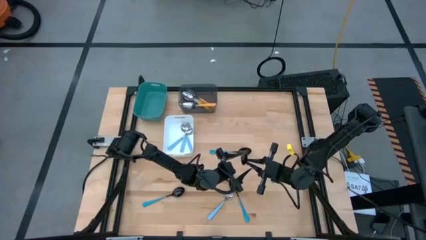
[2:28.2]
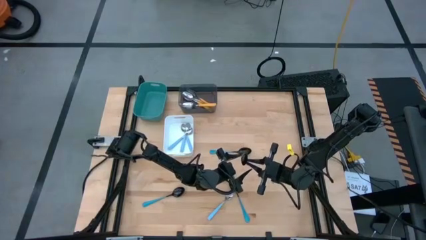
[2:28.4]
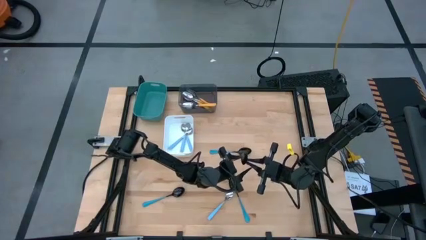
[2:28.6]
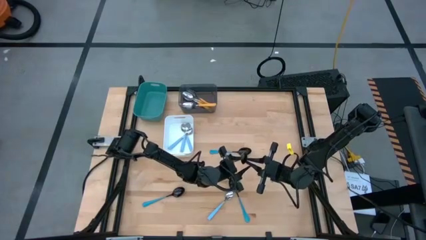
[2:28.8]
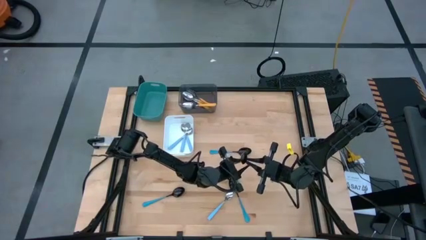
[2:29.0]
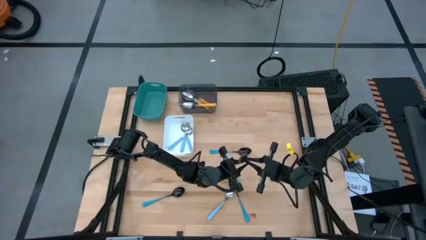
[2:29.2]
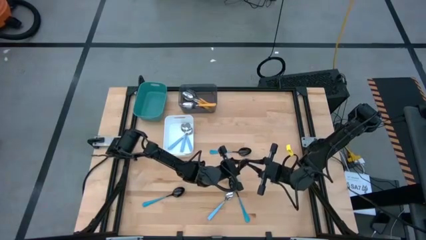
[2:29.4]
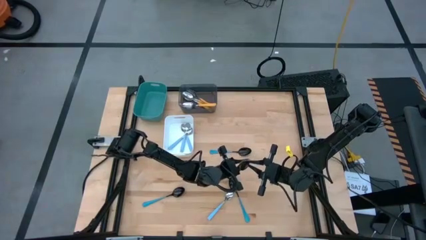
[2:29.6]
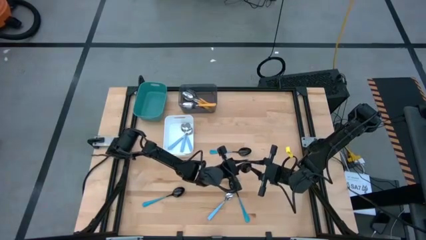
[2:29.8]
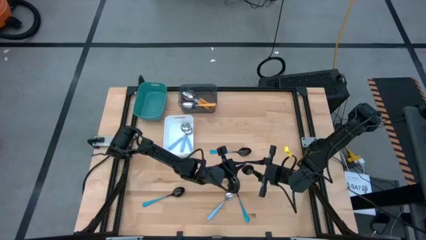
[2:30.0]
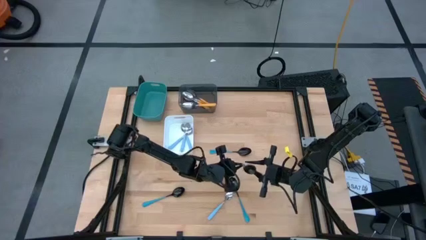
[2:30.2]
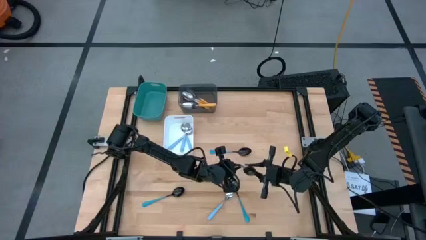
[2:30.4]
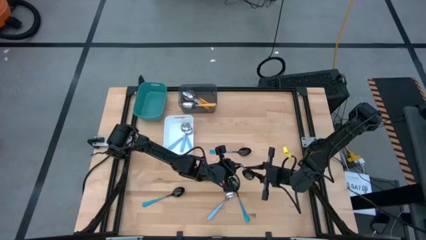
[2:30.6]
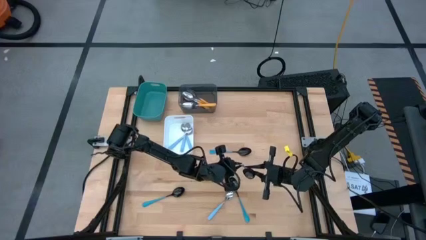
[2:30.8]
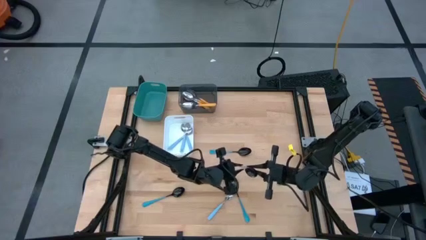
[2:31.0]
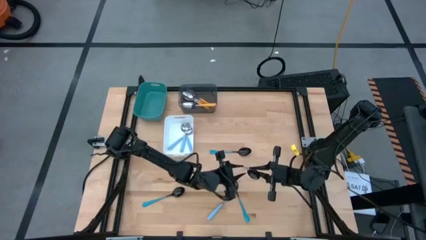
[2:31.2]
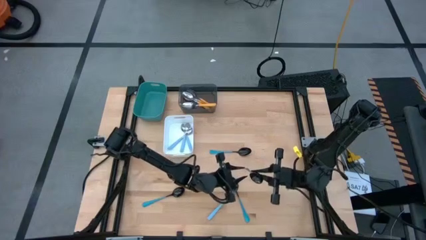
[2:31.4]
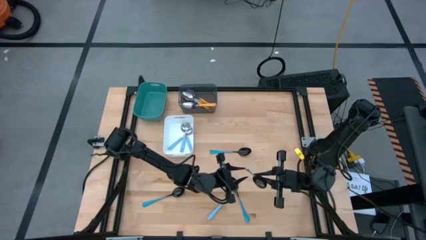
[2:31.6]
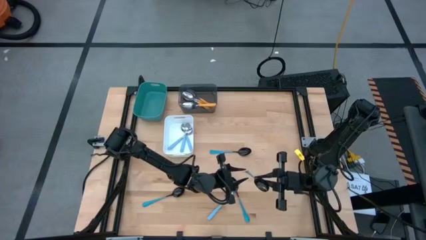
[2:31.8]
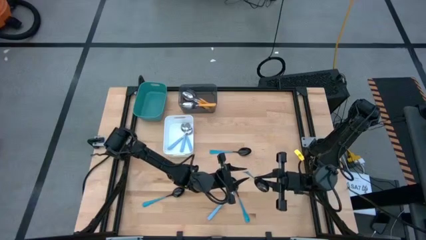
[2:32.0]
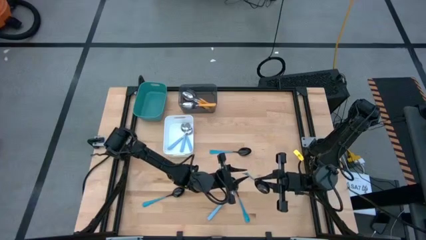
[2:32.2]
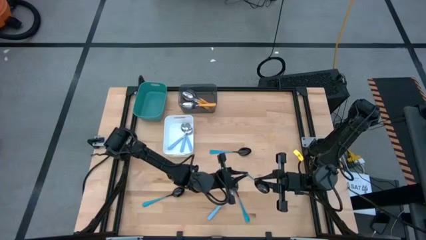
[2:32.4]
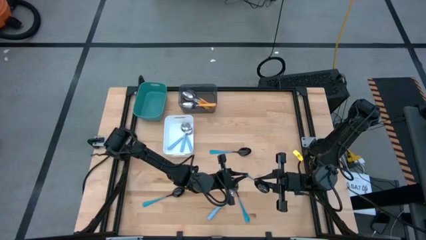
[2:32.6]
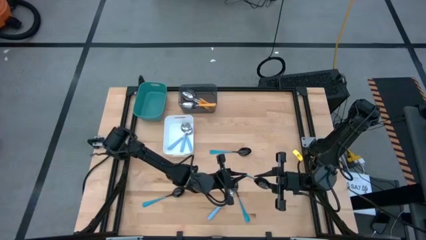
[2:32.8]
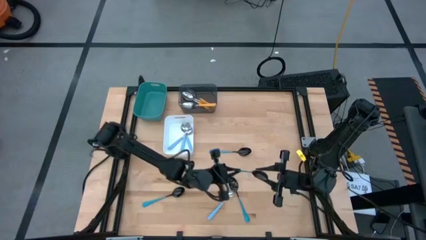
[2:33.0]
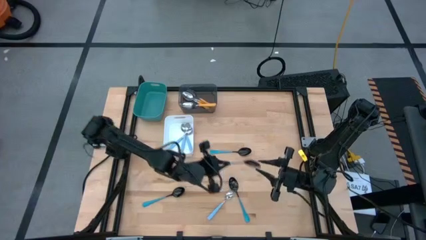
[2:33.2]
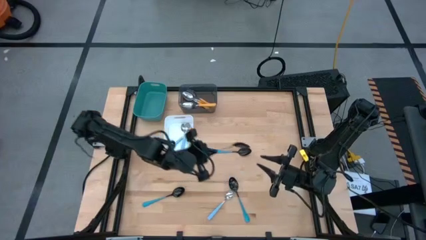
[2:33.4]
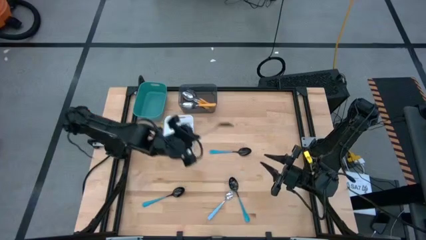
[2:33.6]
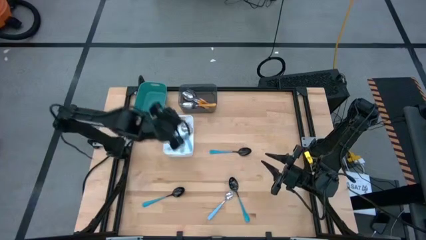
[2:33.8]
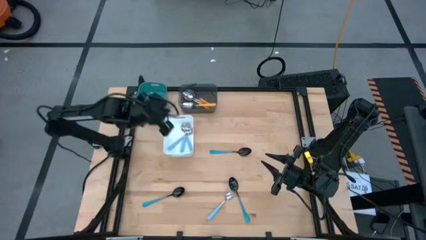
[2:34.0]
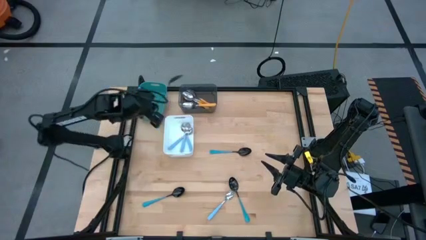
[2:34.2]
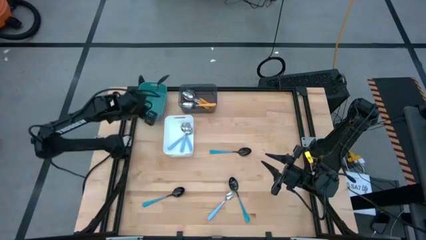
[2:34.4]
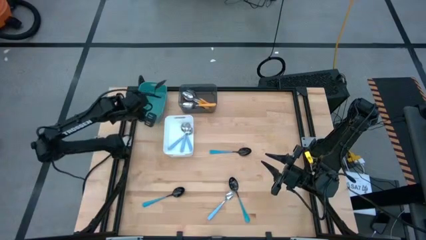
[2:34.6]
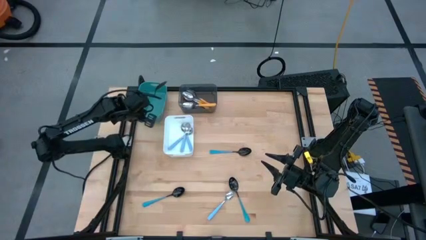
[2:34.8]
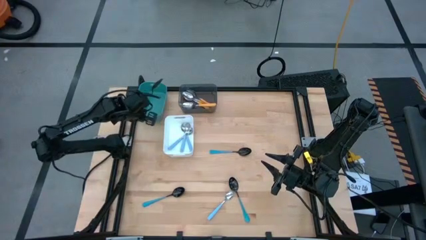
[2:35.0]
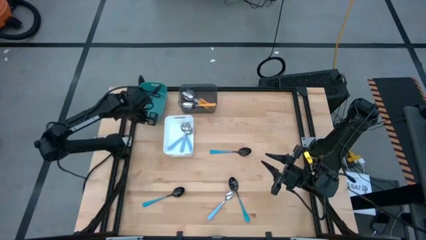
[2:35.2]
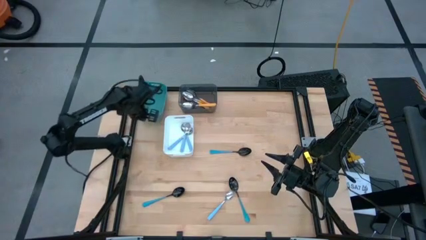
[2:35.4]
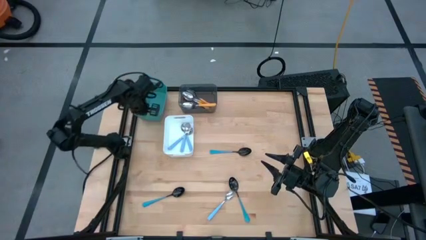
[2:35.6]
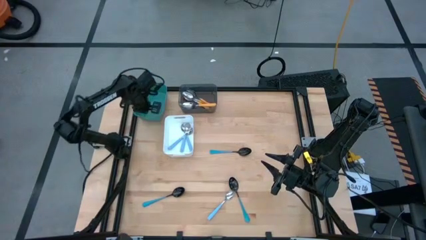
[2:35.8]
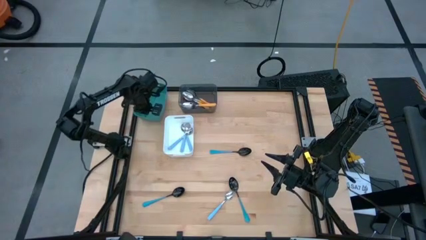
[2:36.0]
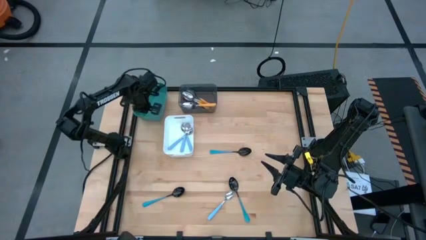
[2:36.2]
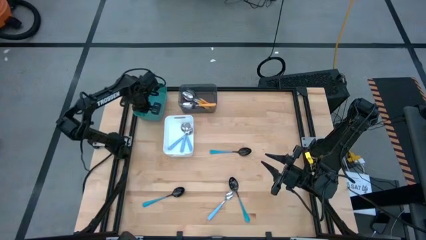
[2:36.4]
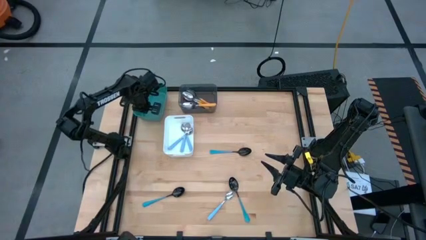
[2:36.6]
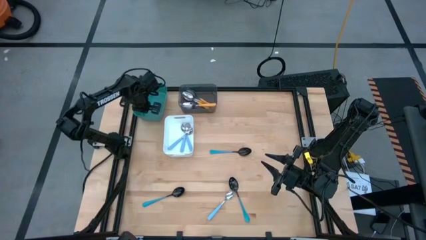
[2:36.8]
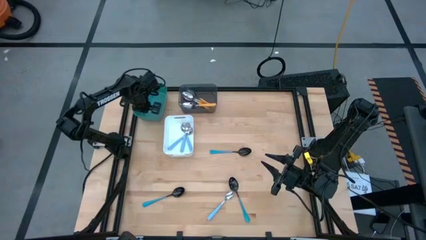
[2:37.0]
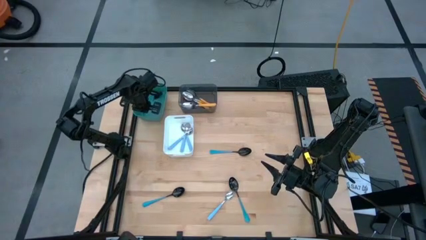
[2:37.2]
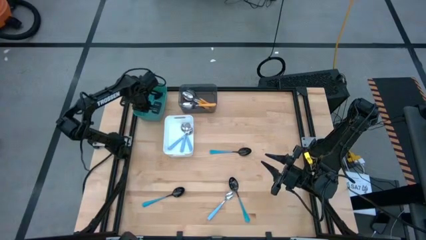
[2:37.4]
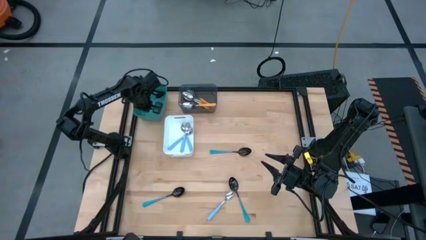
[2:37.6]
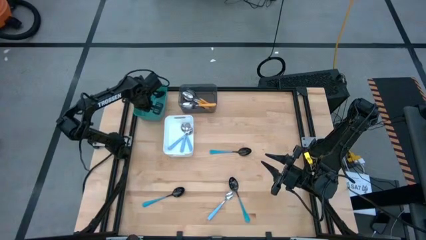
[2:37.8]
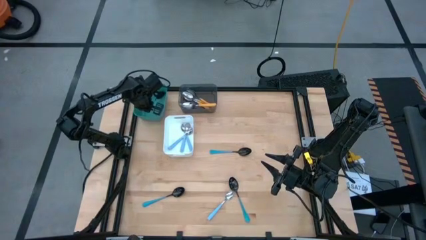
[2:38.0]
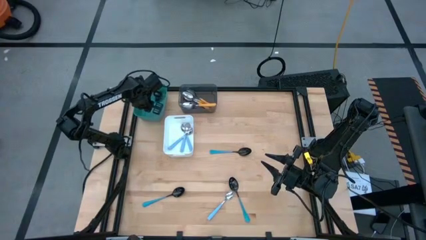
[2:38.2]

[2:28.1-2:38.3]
Task: Sort silverware by color (type)
Put the top right blue spoon into the green bin

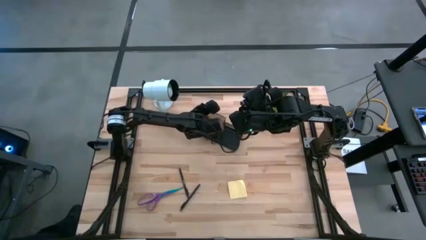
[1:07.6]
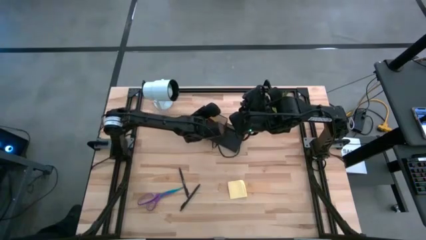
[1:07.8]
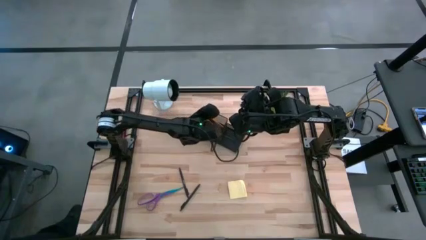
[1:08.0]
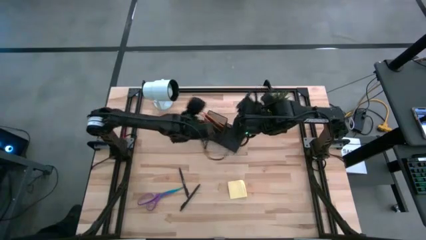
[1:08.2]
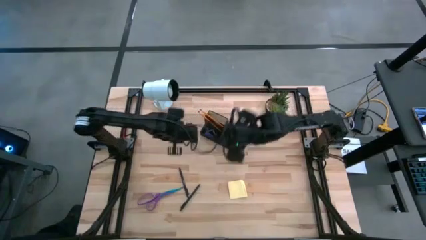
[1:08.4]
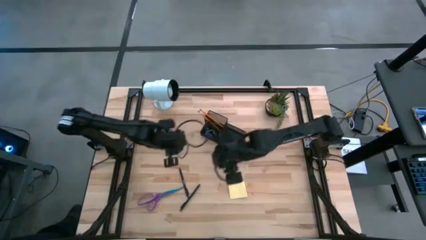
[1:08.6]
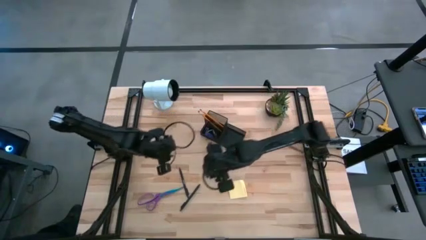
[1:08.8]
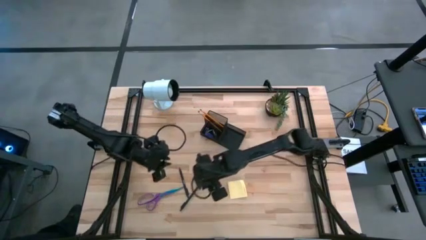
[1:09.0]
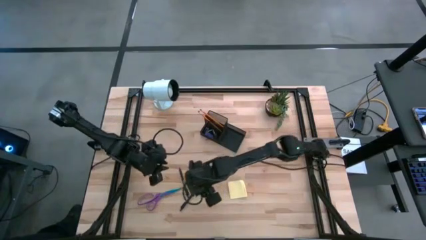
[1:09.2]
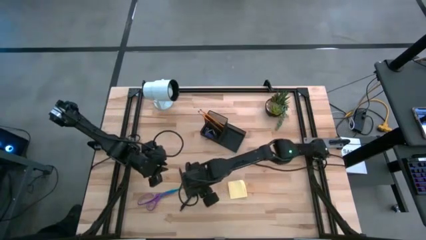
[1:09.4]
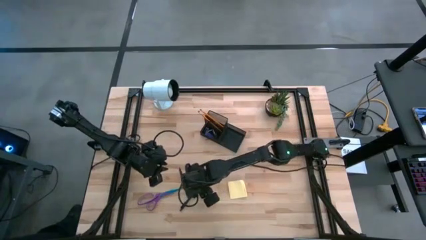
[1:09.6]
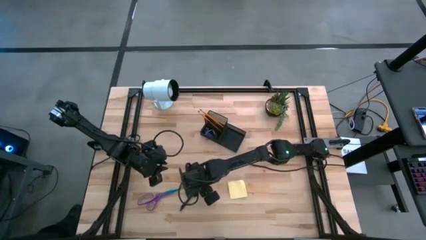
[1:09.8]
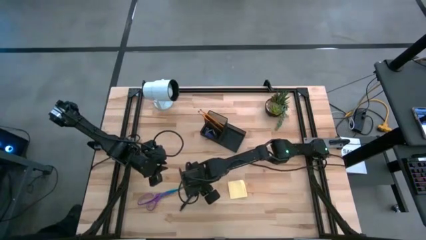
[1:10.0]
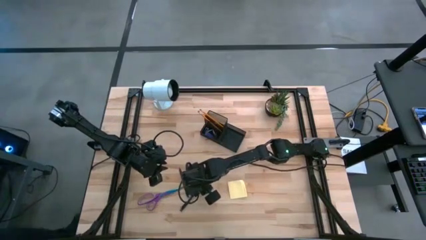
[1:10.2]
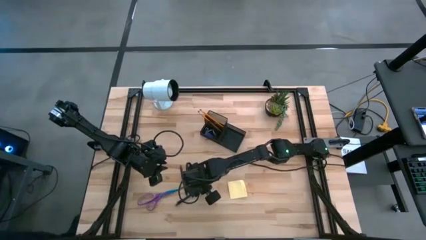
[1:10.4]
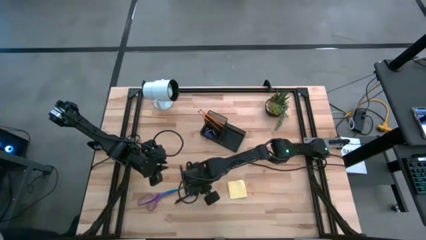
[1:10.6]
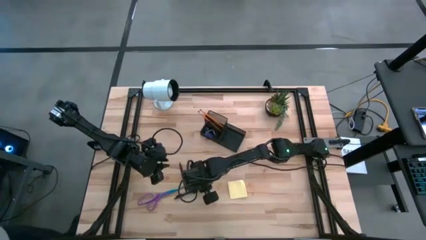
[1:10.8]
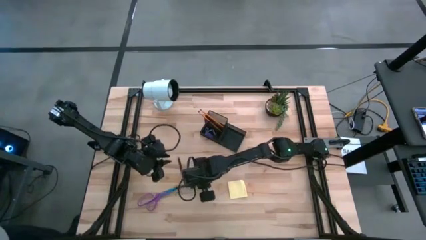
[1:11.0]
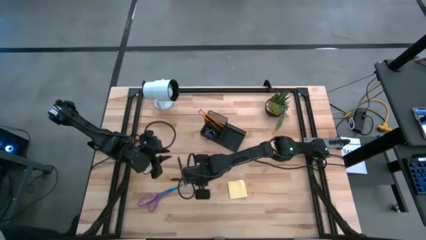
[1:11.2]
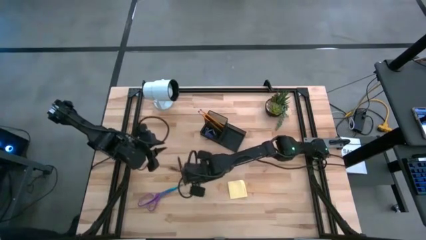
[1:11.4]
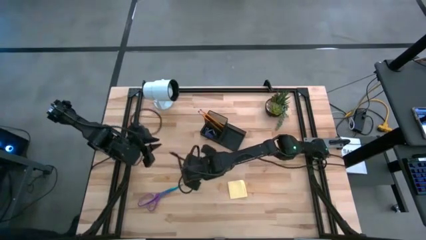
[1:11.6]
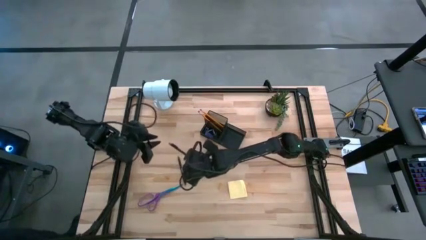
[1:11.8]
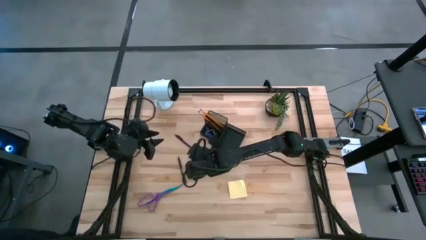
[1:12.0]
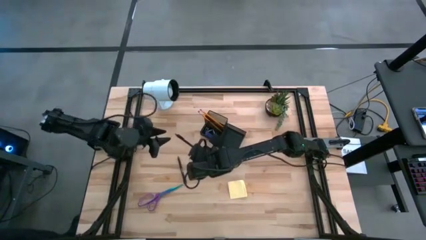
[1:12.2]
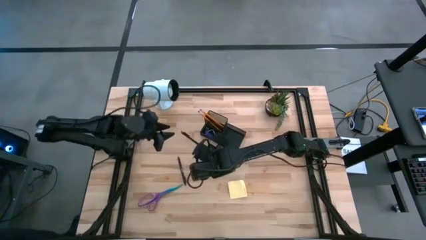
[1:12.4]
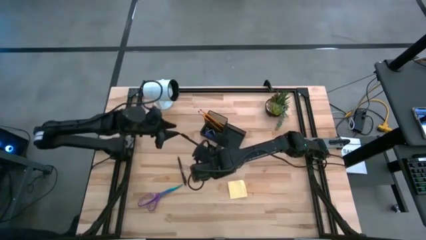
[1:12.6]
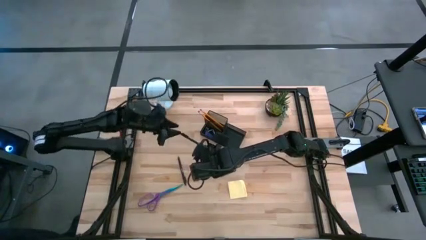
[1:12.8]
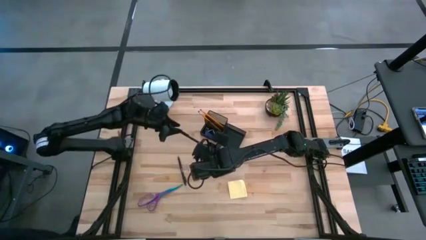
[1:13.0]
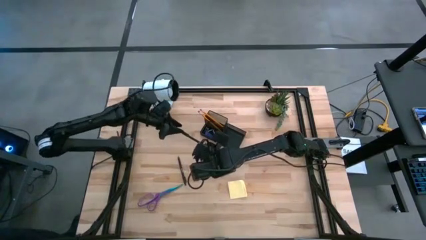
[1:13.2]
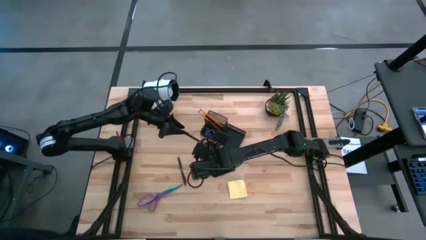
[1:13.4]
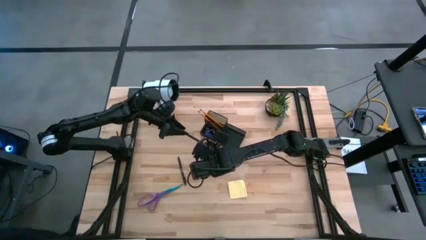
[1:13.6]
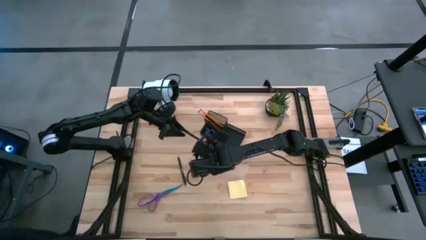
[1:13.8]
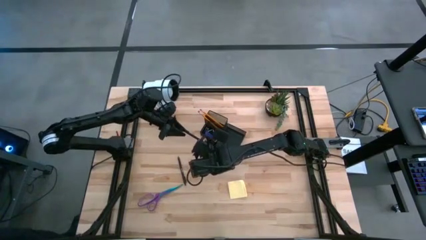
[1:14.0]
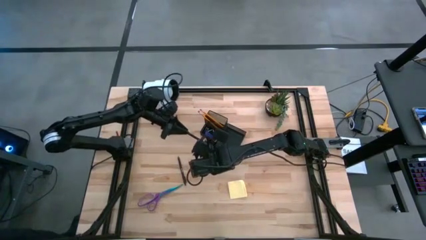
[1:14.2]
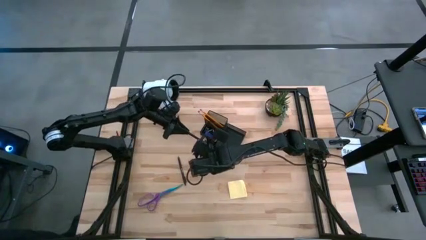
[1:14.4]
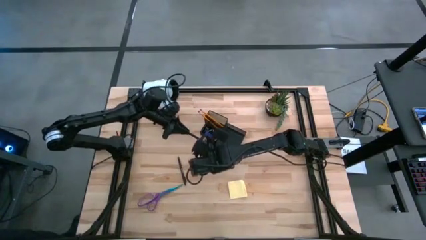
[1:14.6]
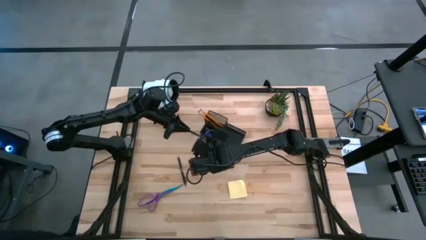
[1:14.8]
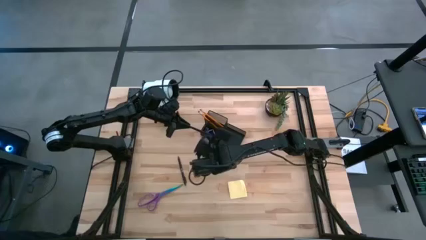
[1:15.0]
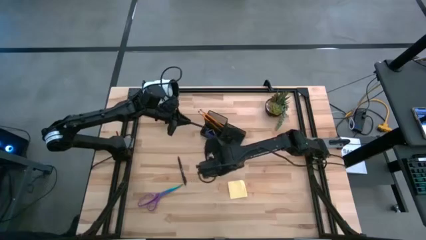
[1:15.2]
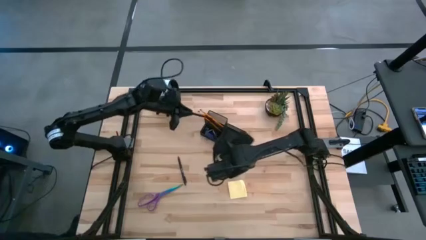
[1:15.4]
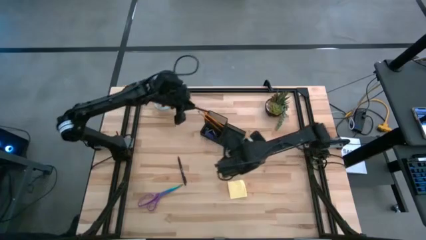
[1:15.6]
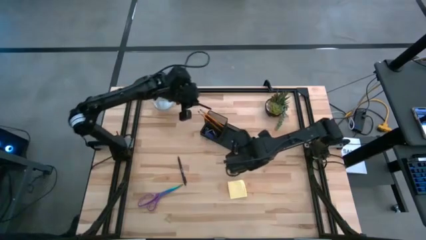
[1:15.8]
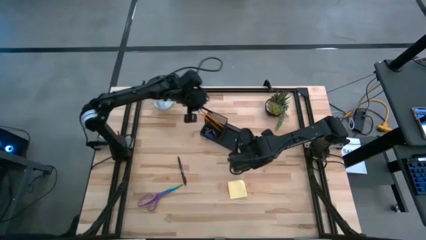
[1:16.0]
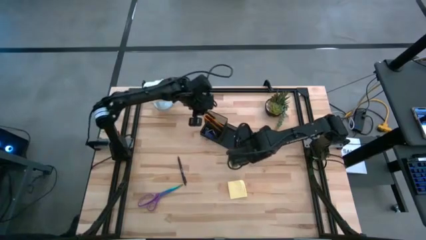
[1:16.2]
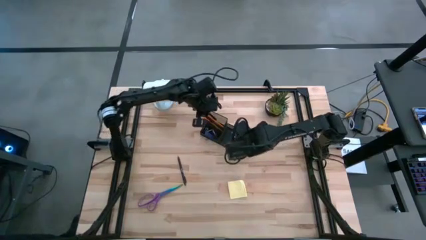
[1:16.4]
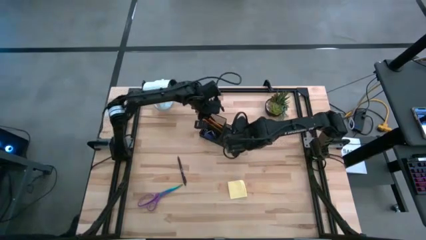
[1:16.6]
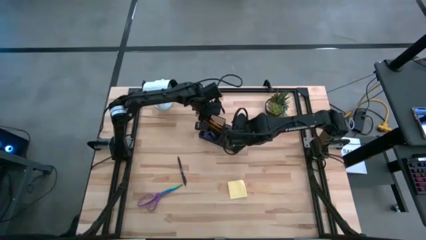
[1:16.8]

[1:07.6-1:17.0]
Task: Pick and place office supplies into organizer
Put the bottom black pen into the black desk organizer
